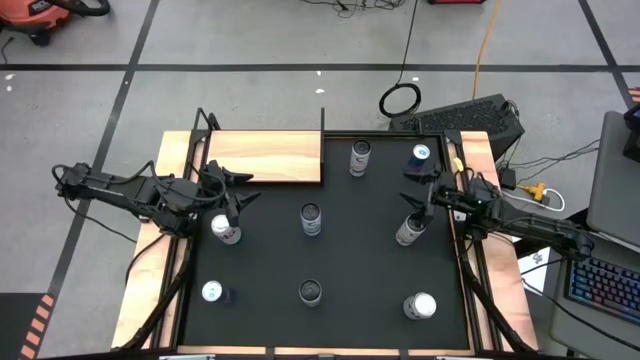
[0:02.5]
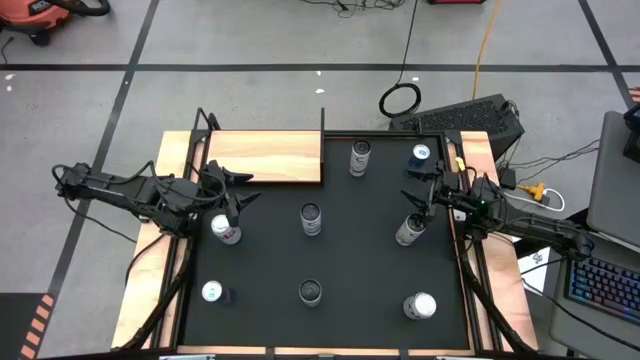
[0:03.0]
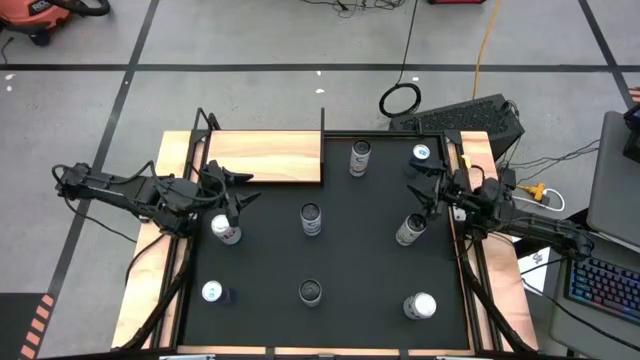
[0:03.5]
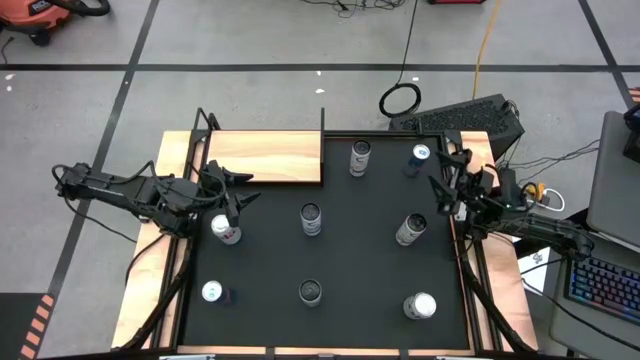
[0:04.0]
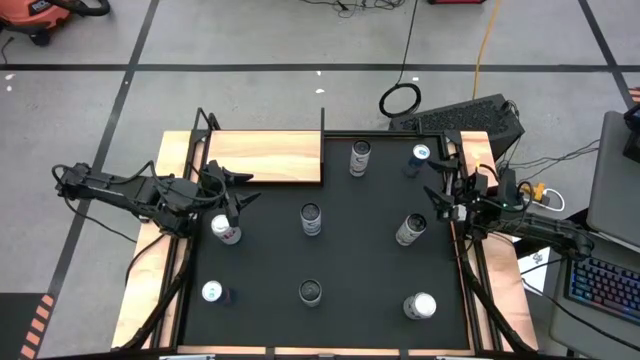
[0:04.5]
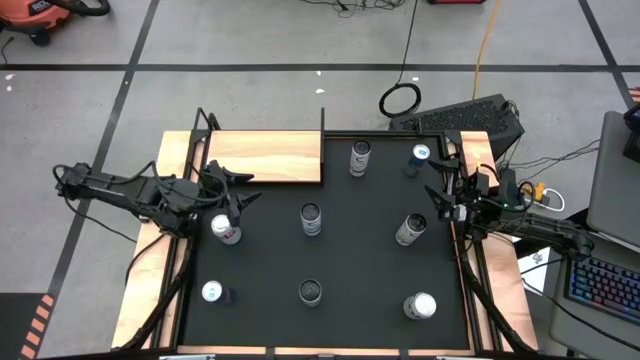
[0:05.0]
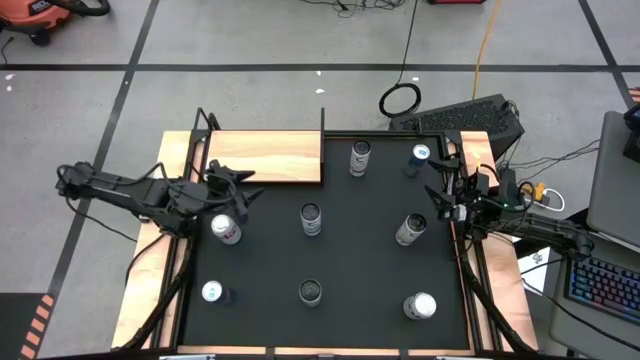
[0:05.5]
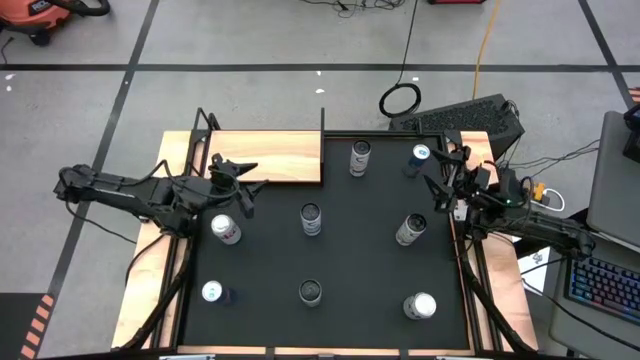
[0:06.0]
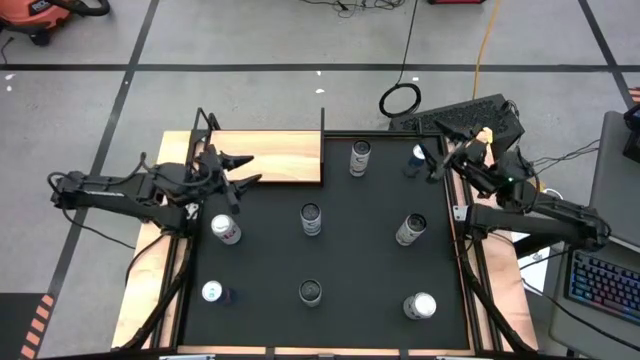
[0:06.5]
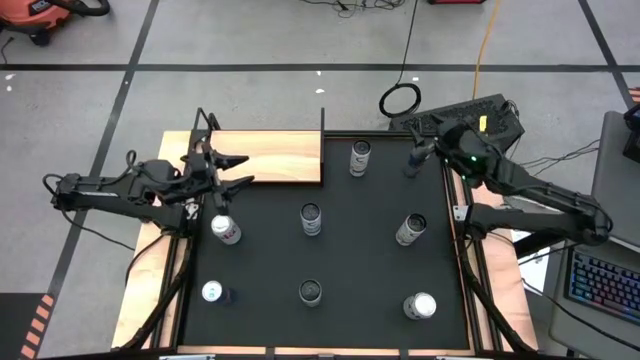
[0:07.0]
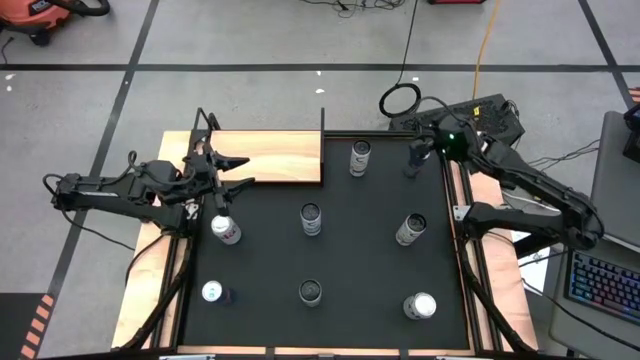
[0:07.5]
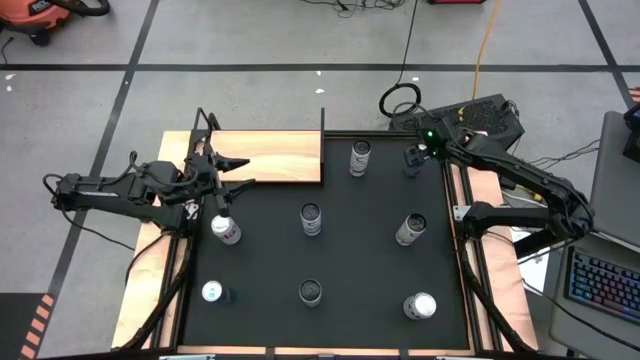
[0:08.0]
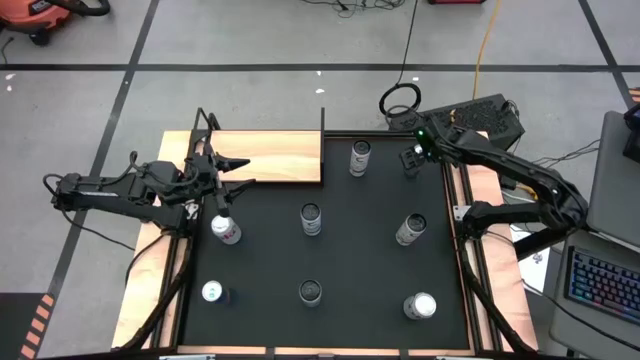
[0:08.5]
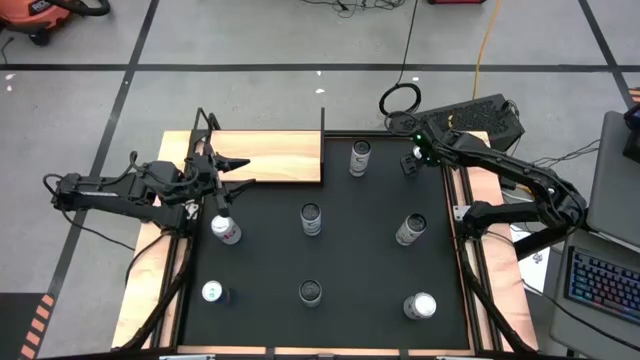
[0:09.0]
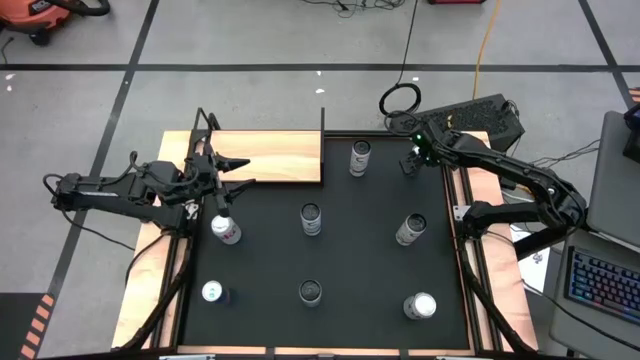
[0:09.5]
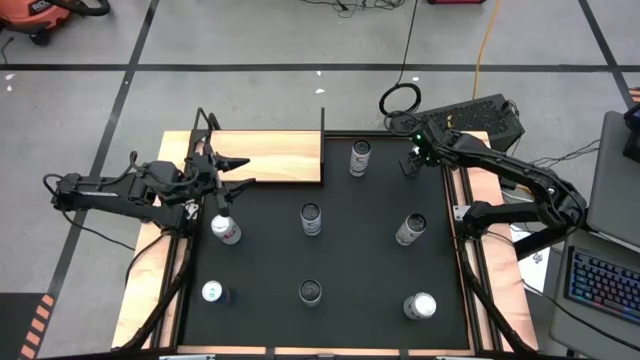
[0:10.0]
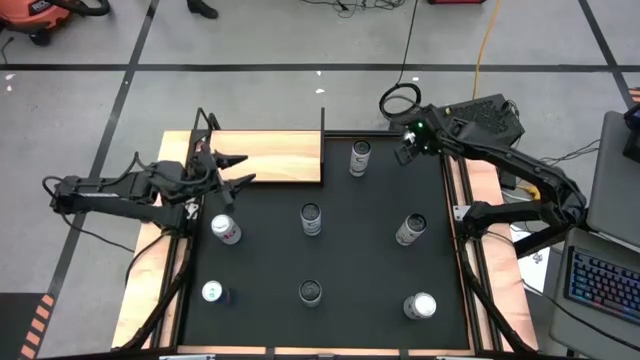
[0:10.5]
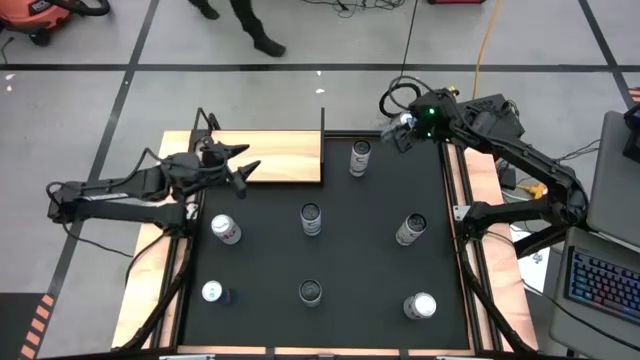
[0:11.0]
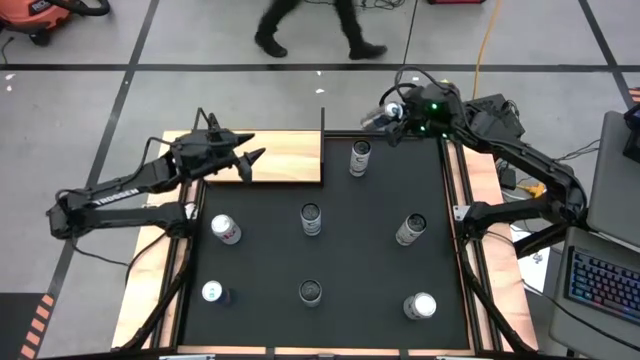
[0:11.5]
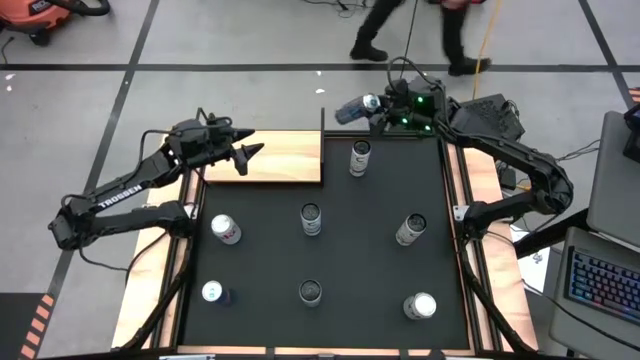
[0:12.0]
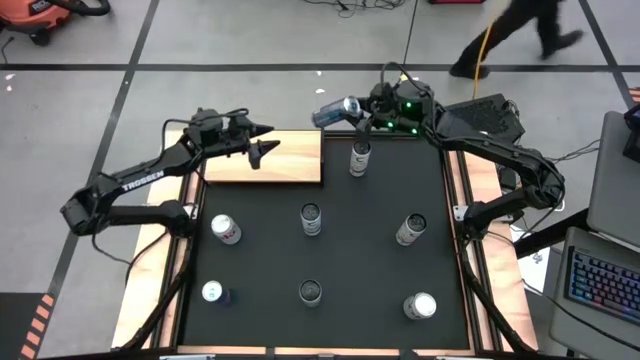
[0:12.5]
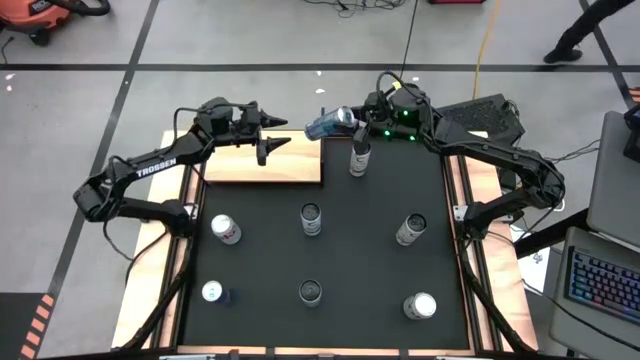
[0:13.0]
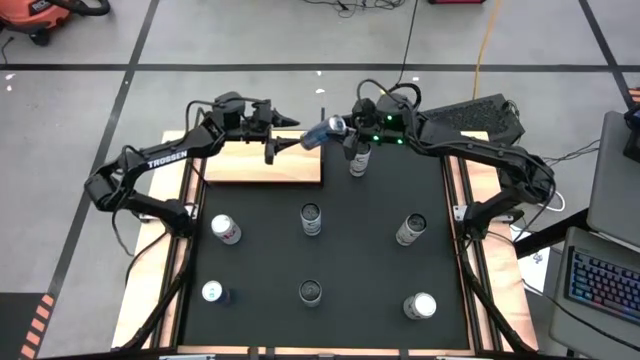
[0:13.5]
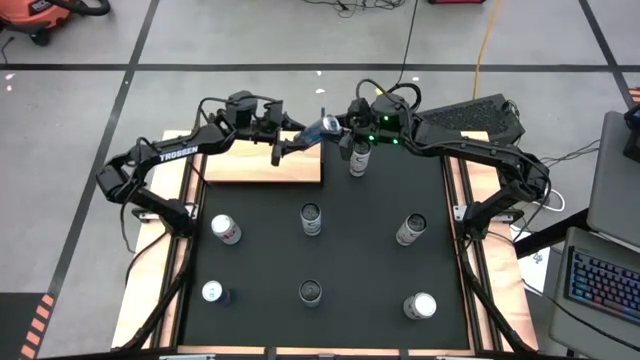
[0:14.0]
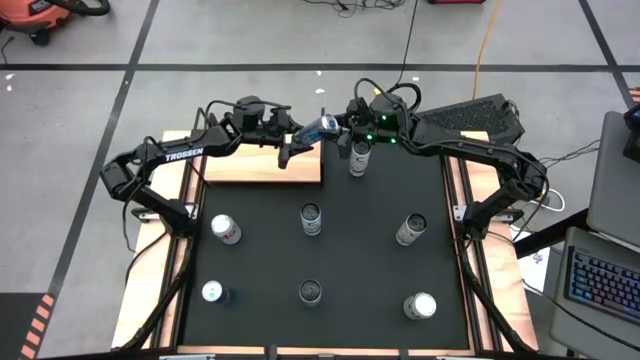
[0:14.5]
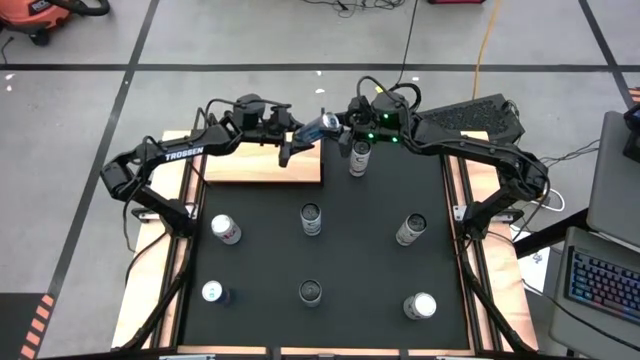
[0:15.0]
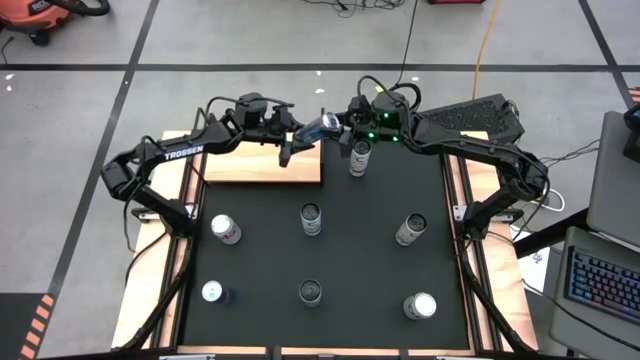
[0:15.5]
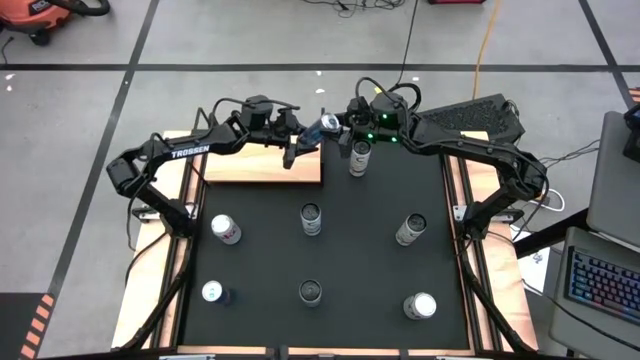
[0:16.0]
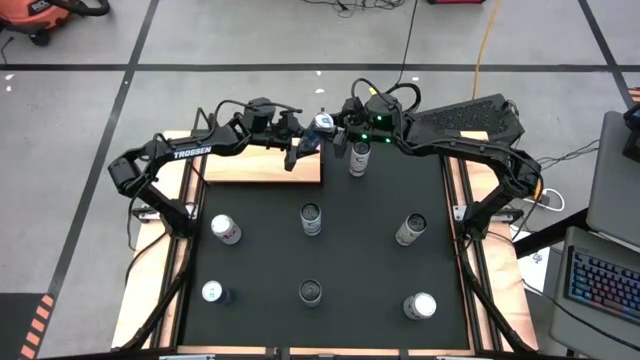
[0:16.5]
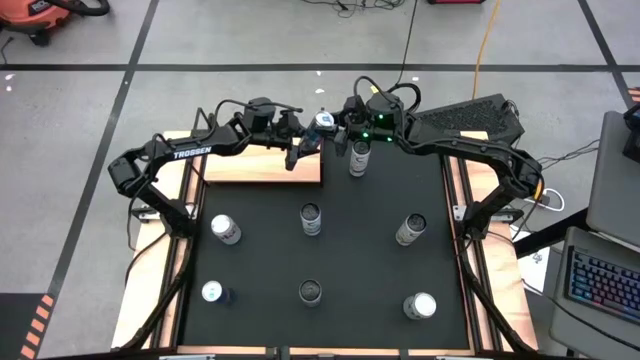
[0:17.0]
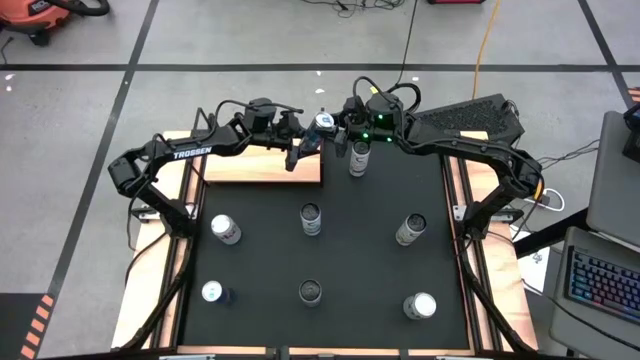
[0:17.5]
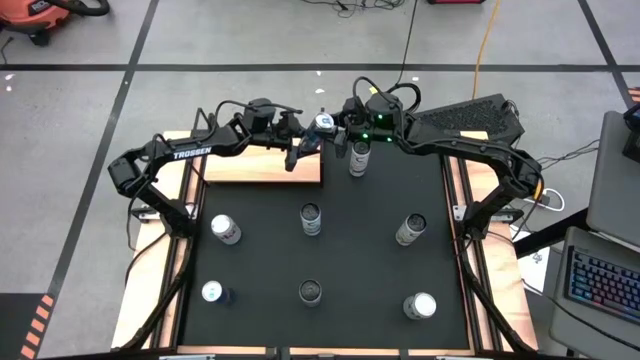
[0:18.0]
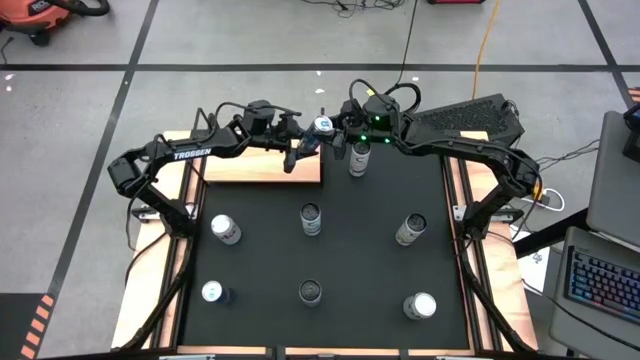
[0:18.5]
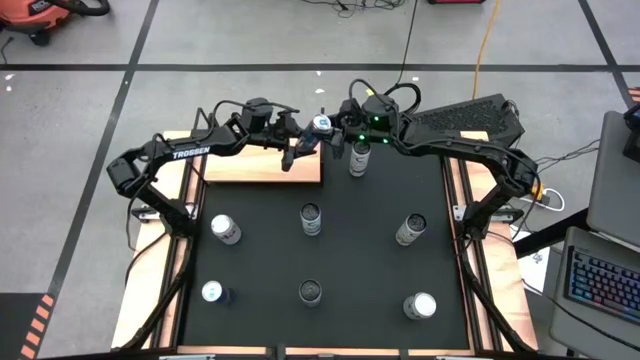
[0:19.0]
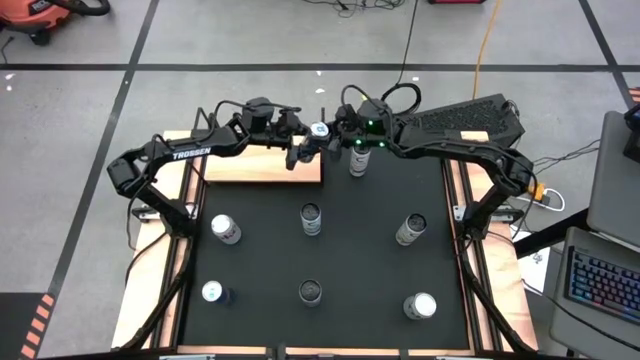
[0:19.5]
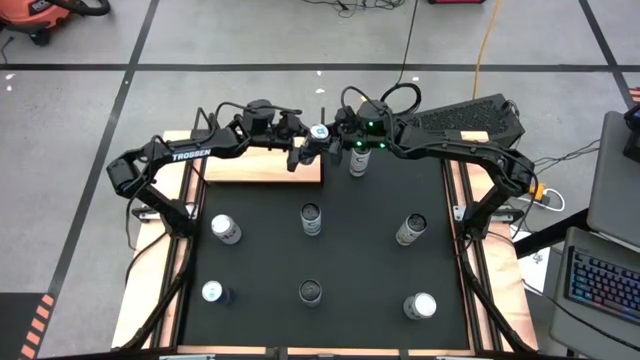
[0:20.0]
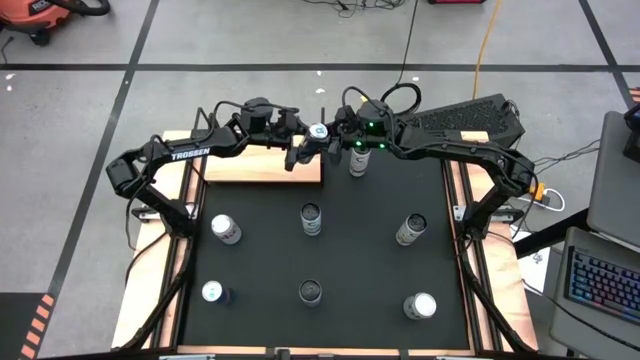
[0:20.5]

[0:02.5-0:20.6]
Task: Place canned beverage on shelf
Put the top blue soda can on the shelf

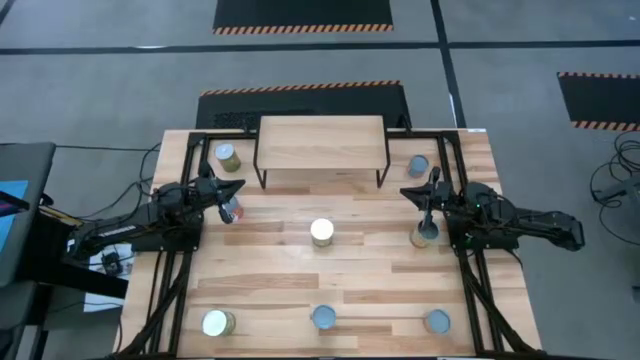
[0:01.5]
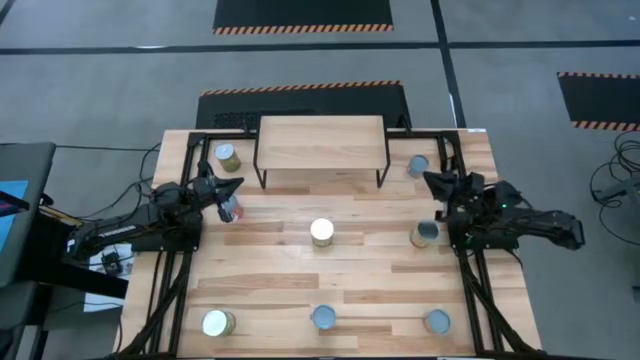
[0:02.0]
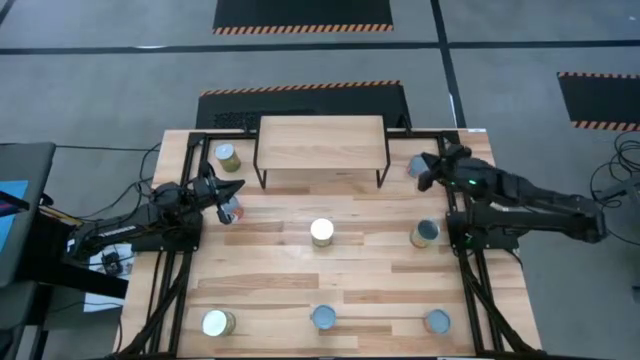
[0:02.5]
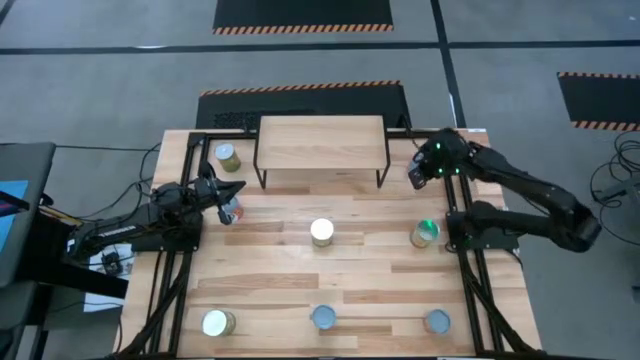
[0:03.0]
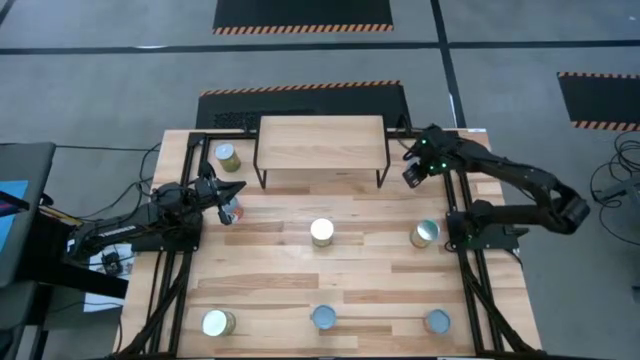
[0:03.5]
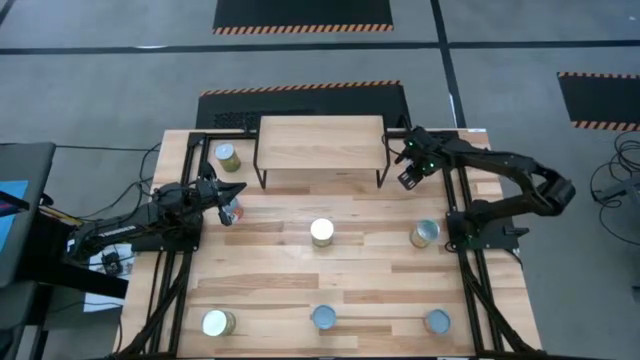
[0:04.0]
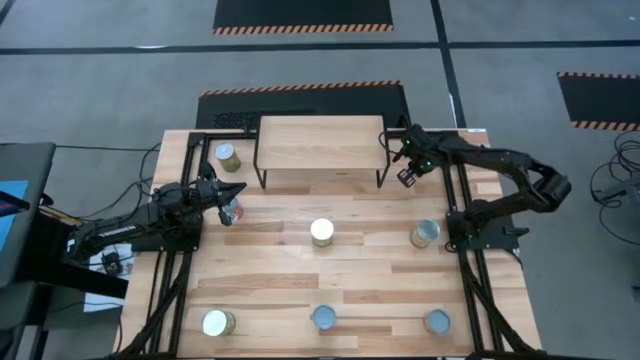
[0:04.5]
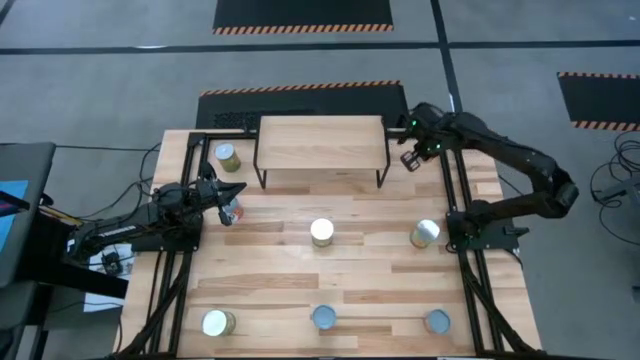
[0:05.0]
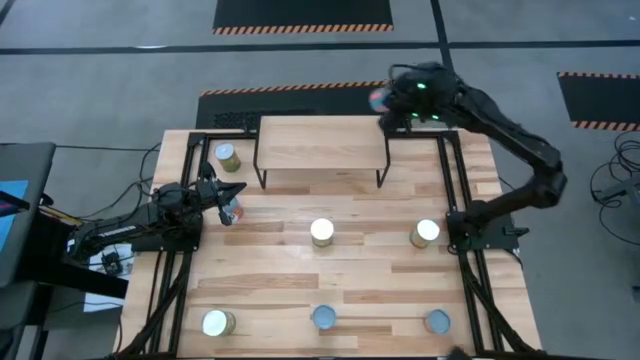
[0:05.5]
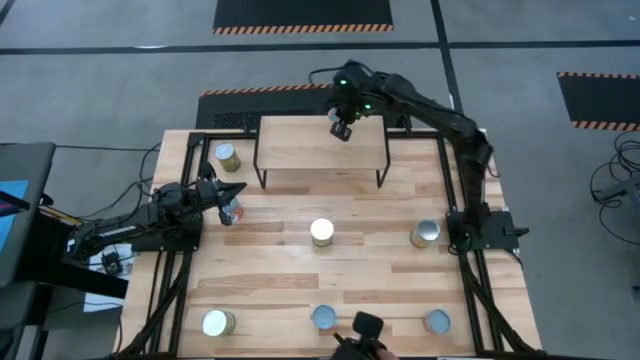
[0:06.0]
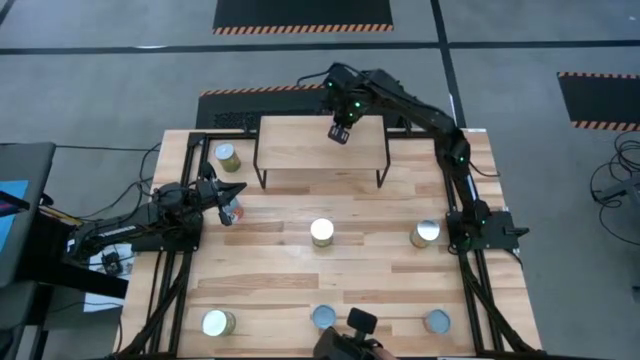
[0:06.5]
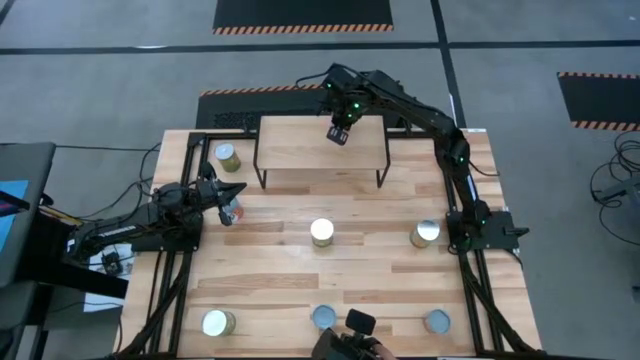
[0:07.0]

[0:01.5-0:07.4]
Task: Pick and place cans onto a shelf
Put the top right blue small can on the shelf
